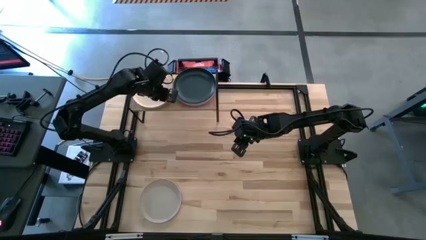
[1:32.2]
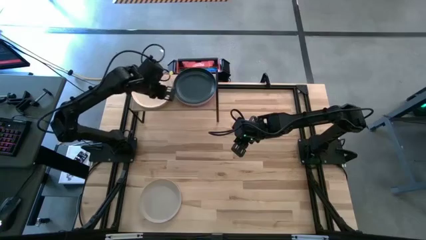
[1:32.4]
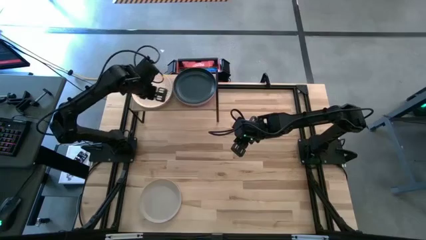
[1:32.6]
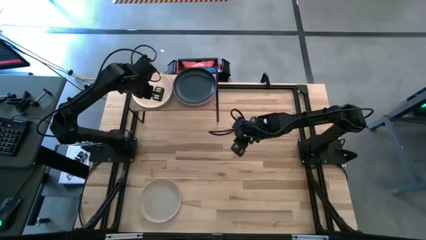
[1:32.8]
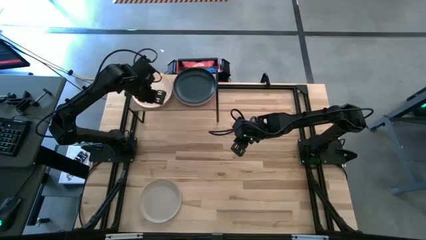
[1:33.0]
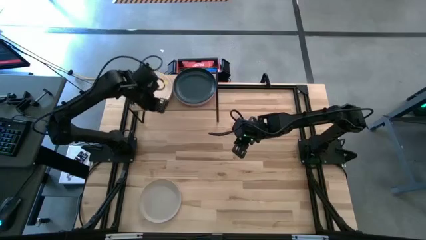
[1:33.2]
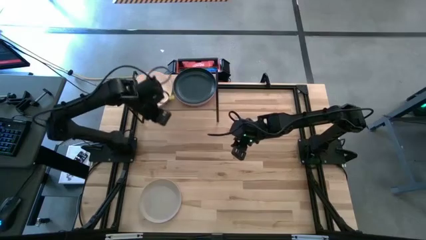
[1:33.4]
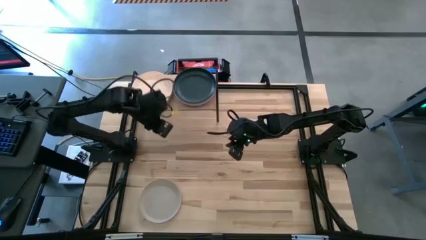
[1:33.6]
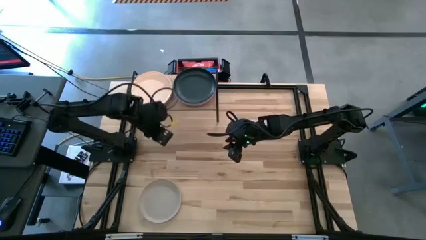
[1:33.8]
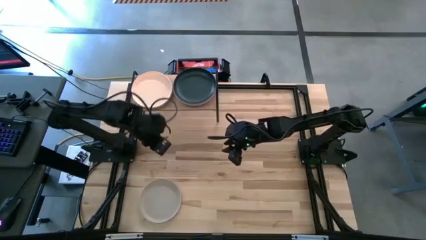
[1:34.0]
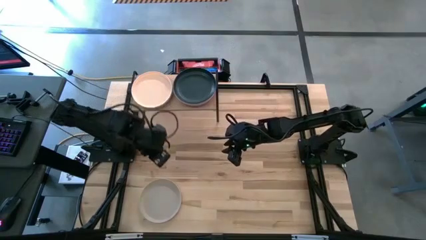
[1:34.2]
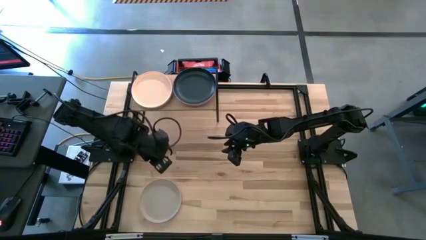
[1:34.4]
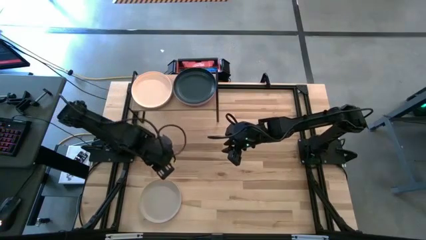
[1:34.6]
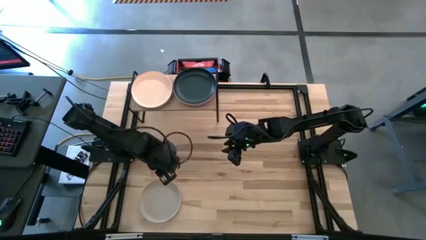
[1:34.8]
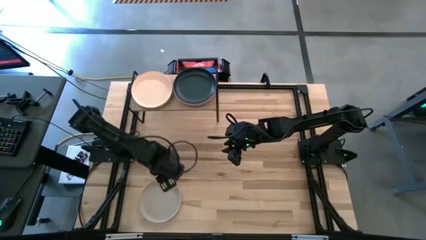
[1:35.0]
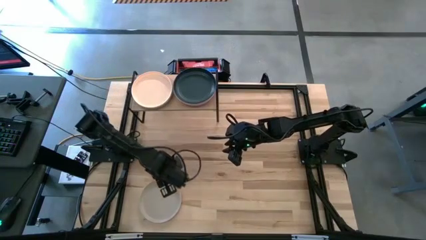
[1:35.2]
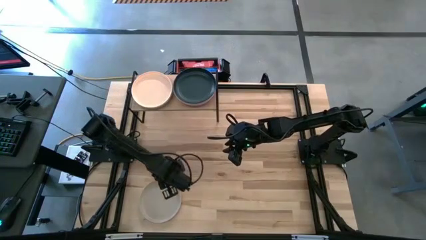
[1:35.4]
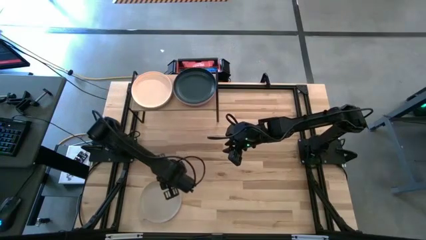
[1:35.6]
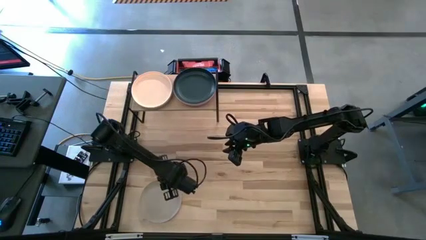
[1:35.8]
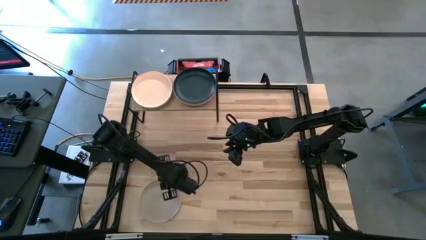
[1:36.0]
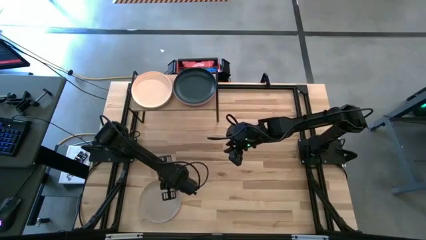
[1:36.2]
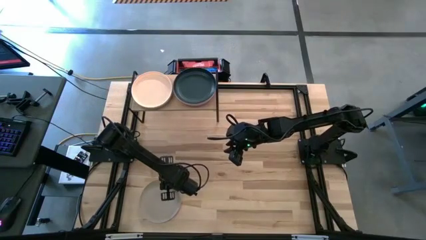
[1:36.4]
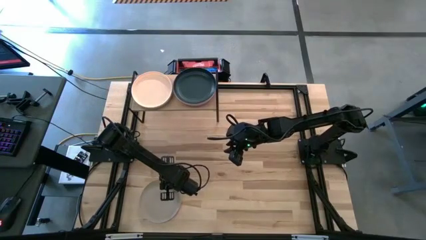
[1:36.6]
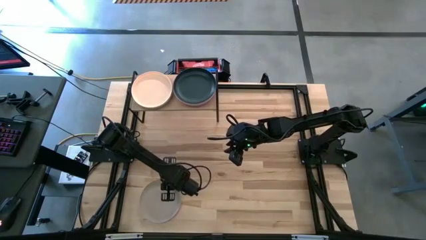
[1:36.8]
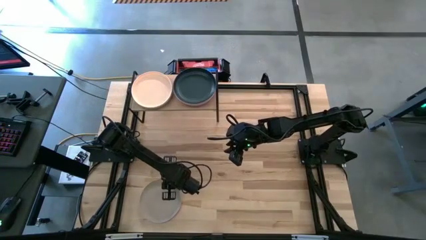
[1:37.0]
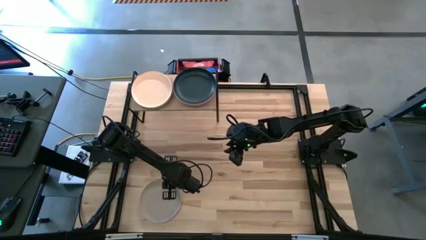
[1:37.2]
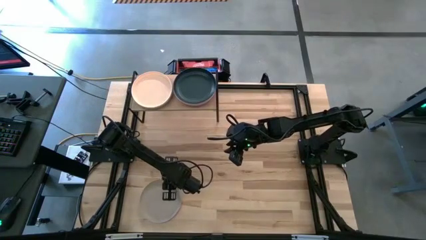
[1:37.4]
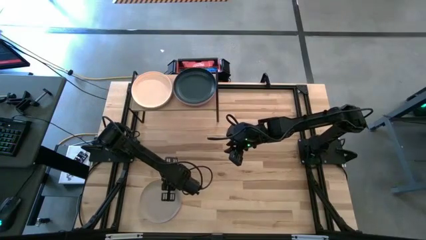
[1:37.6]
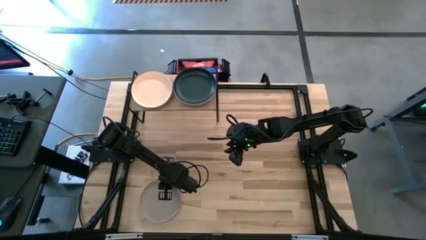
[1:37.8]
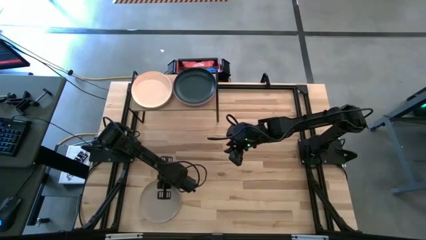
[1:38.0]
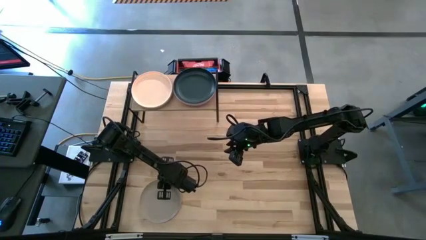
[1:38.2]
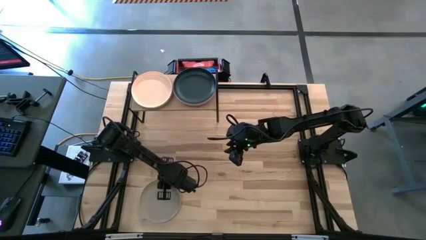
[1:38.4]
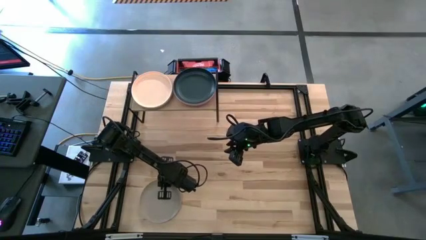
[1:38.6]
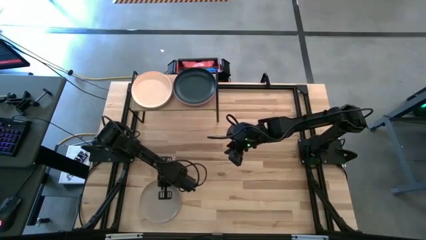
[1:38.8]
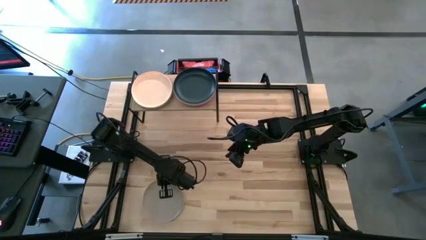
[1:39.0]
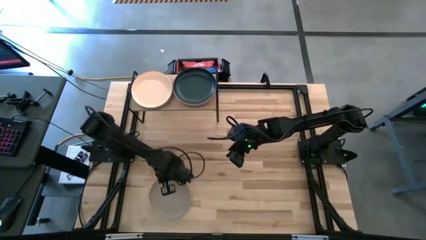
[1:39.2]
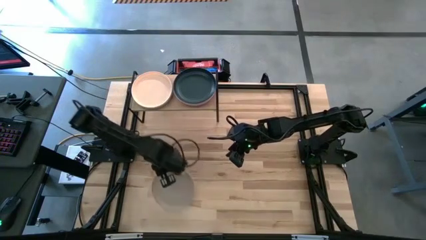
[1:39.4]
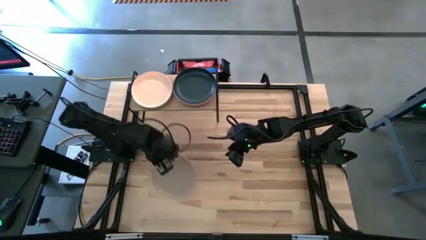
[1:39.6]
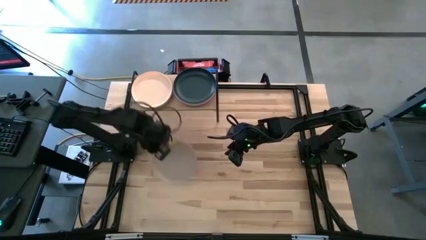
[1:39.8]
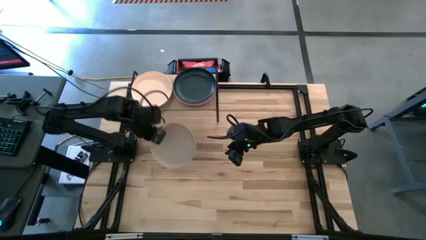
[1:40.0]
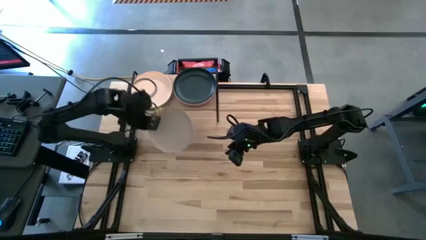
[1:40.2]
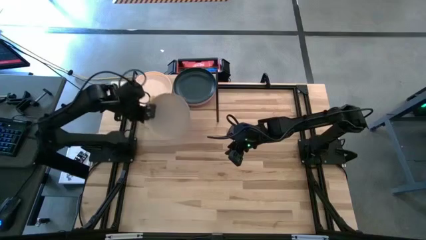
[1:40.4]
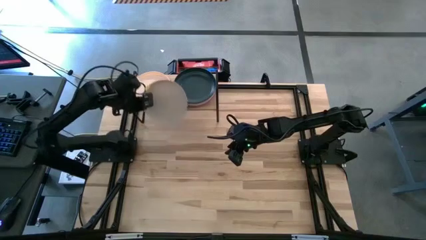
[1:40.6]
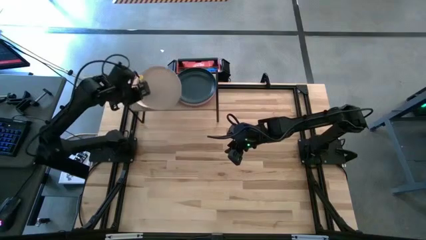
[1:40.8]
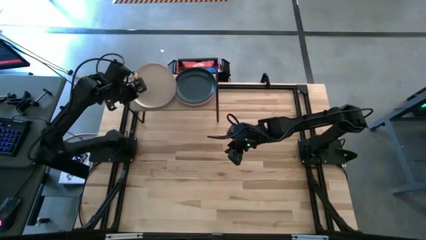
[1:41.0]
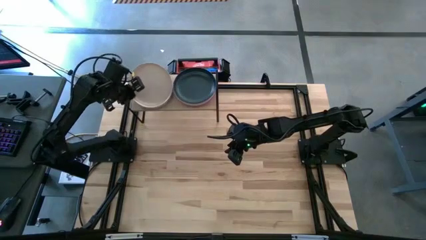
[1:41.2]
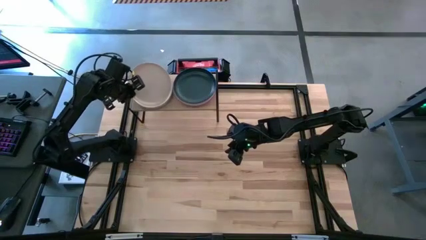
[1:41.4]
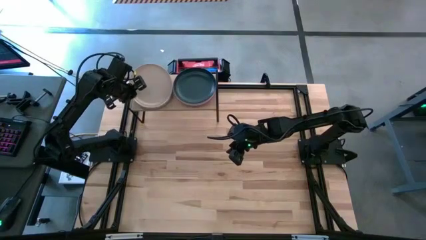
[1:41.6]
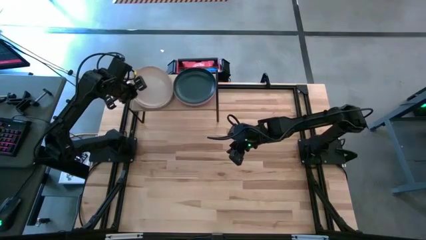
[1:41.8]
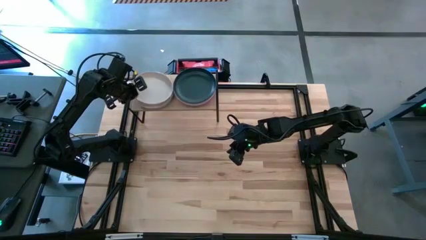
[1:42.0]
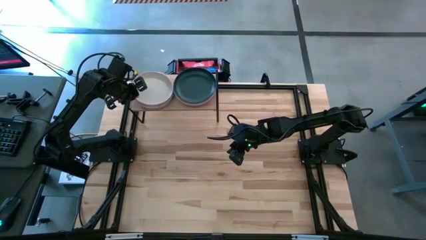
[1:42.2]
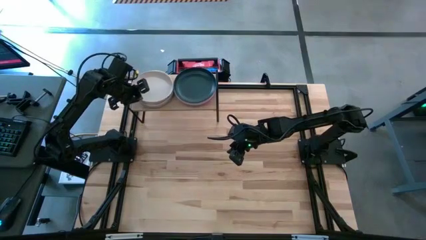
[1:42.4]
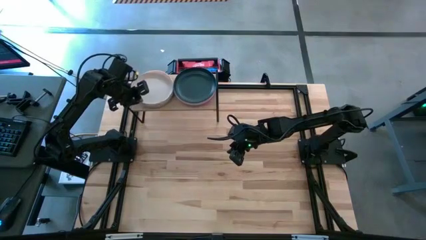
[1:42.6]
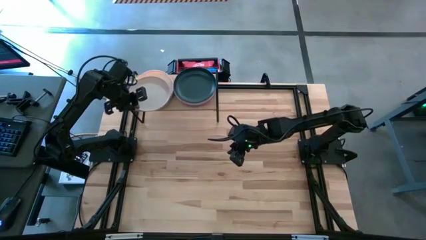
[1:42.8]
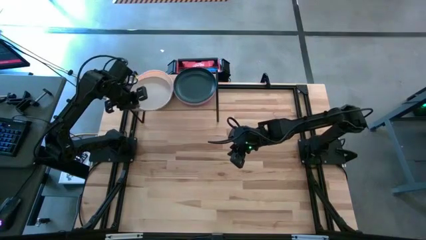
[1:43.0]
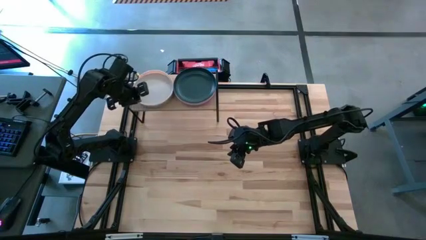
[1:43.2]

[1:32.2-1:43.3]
Task: Place and stack plates onto a shelf
Stack the gray plate on top of the light orange plate on the shelf

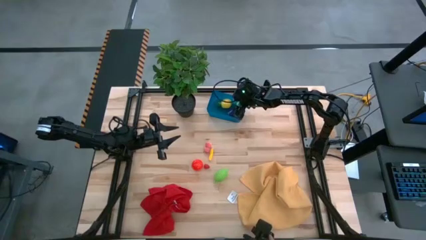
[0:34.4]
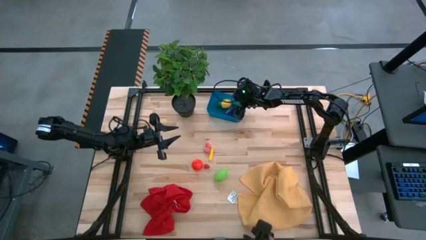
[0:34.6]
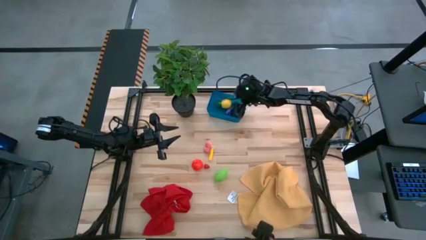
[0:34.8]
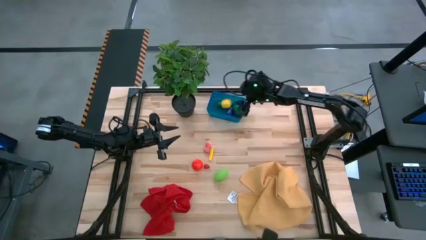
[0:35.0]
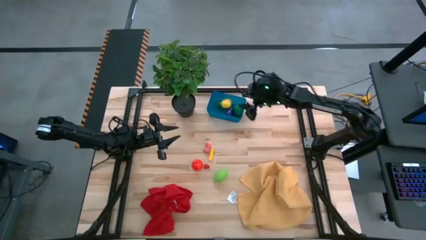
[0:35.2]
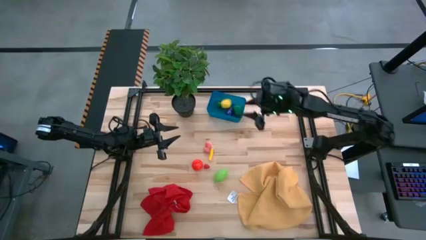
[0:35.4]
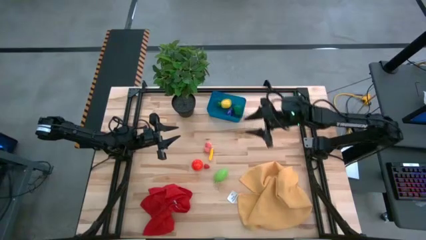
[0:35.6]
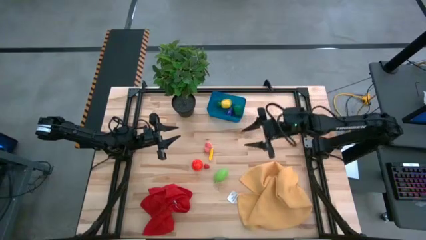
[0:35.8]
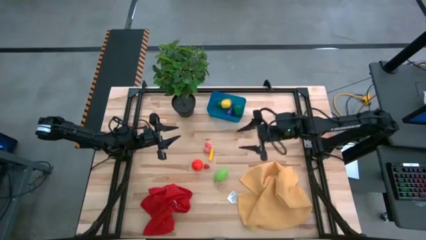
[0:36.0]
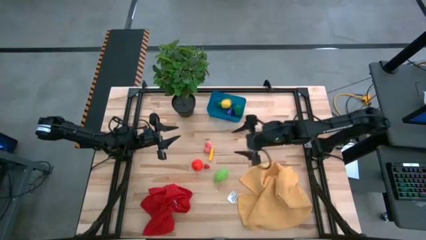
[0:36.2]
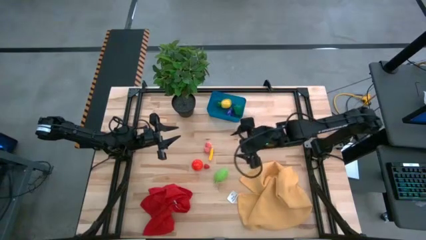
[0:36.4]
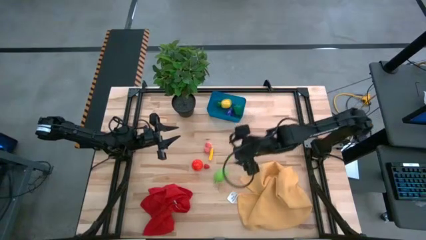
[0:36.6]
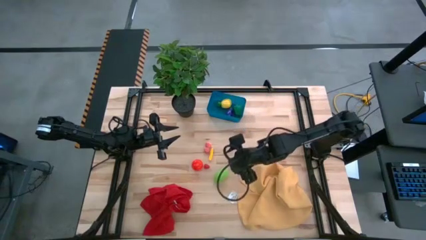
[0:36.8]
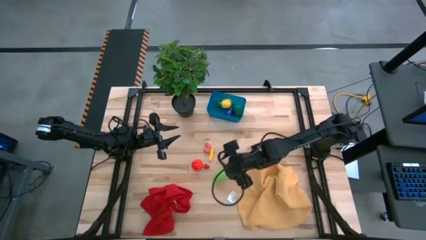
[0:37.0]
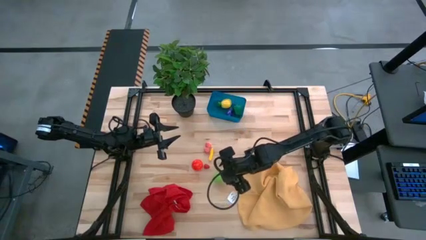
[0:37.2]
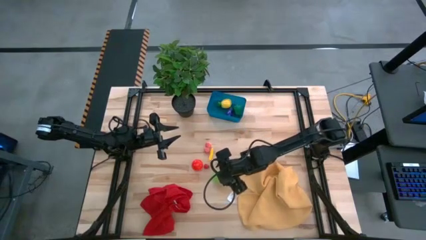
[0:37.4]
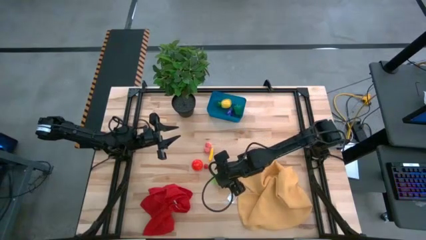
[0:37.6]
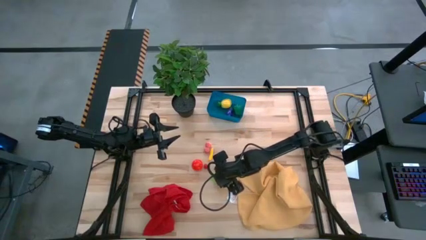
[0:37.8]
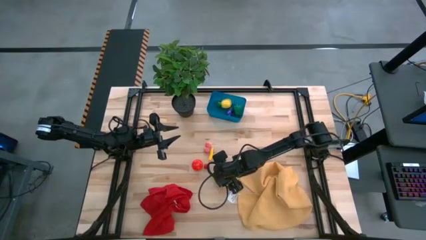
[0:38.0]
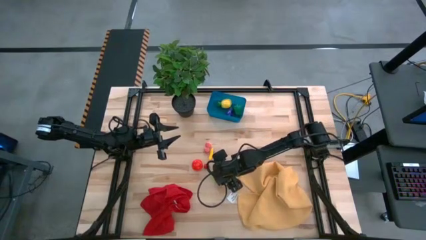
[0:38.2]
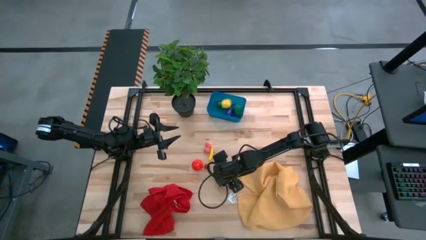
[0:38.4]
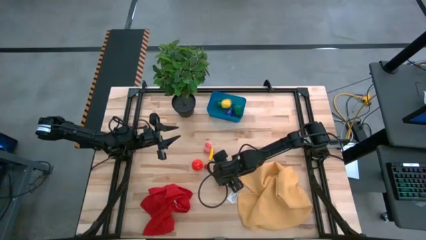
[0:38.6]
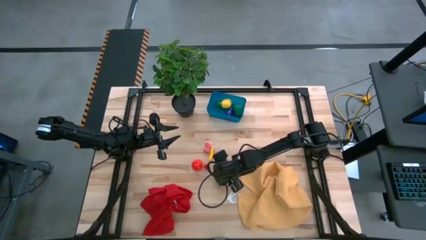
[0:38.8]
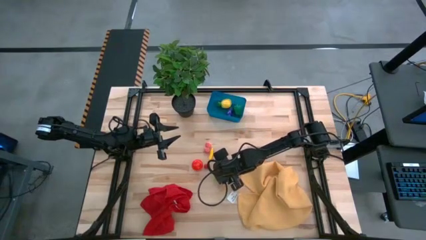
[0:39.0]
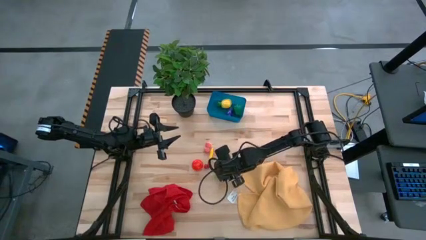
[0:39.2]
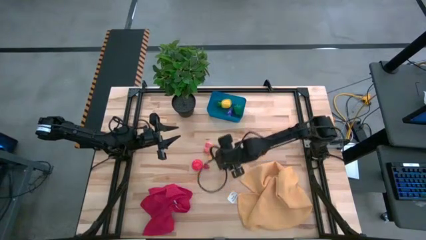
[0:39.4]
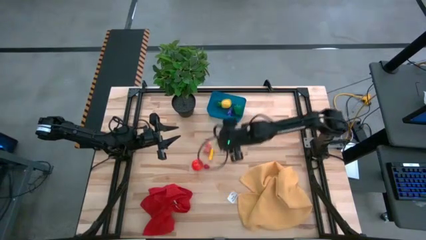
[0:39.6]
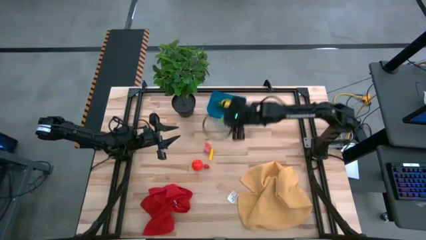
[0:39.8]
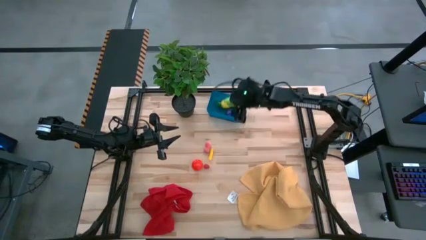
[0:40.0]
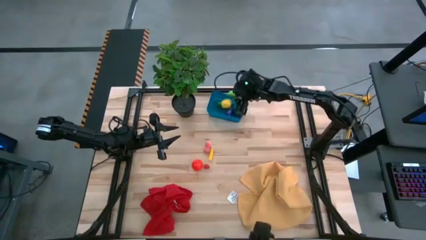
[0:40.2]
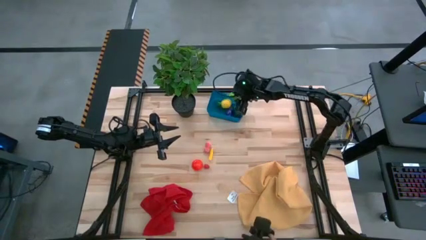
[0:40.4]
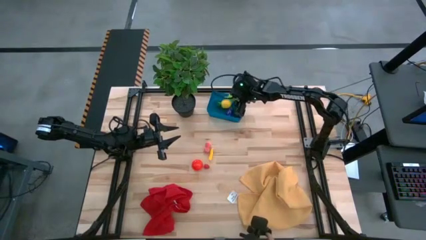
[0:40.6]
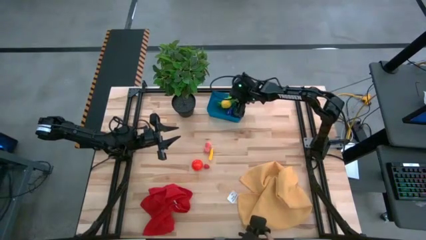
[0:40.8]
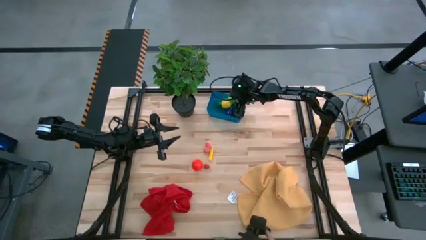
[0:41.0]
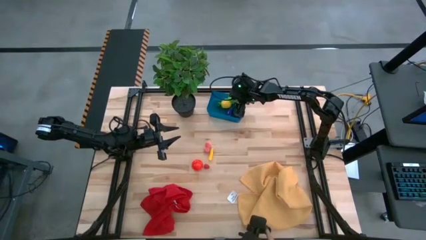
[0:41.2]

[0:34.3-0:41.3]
Task: Pick and placing Produce into tupperware
Put the green melon into the blue bin
